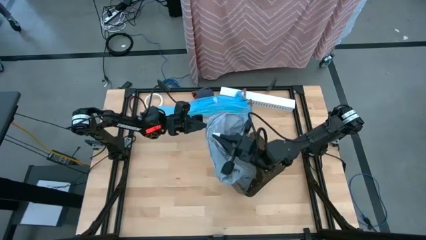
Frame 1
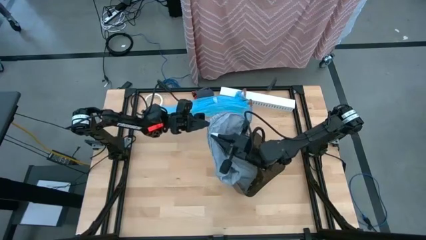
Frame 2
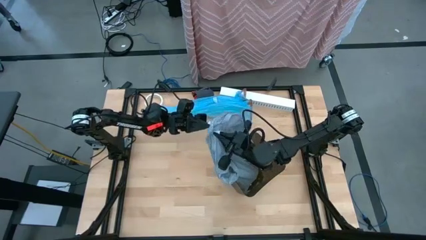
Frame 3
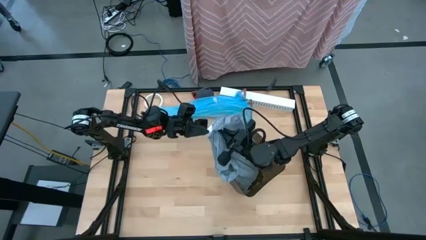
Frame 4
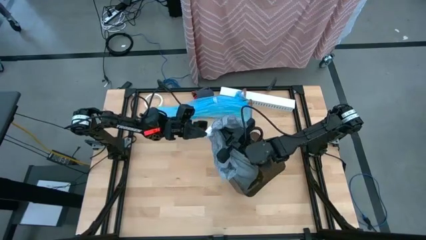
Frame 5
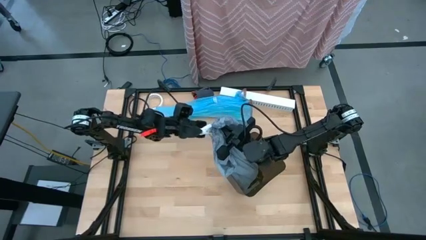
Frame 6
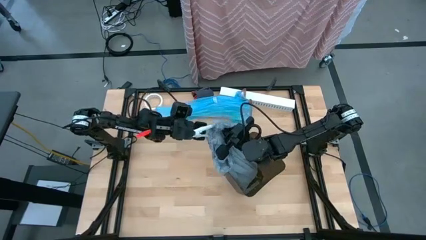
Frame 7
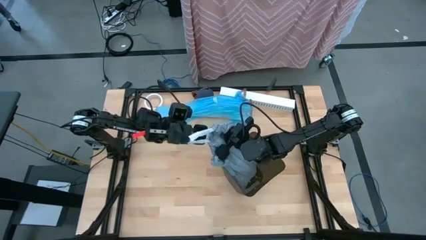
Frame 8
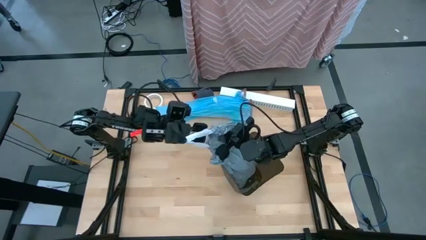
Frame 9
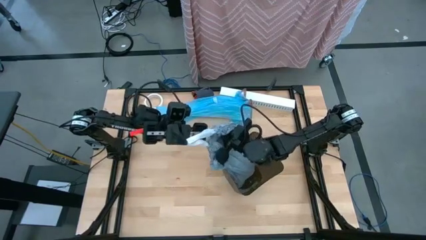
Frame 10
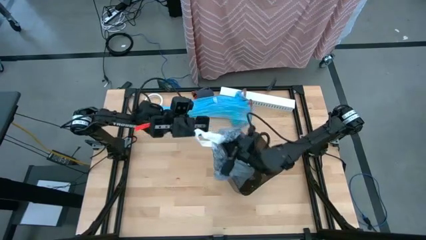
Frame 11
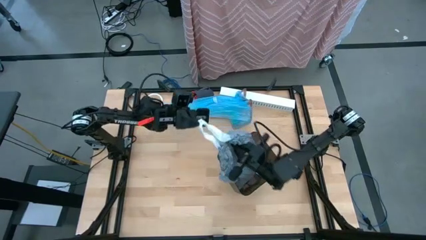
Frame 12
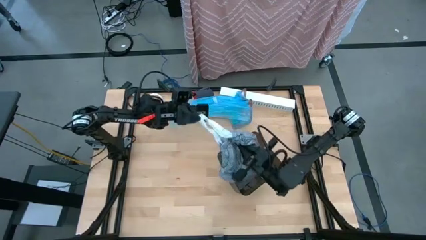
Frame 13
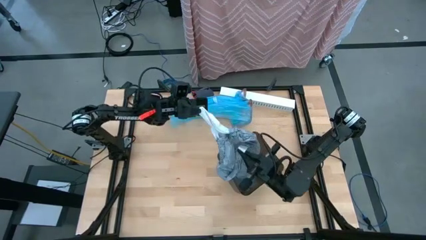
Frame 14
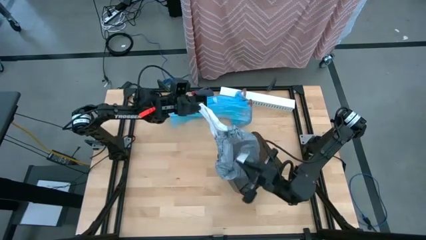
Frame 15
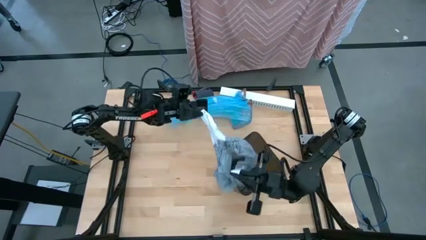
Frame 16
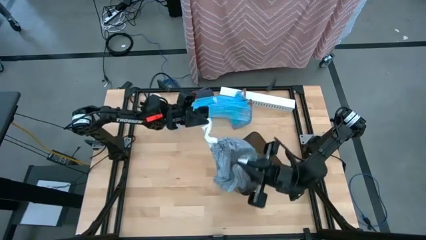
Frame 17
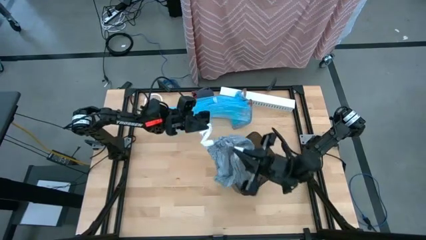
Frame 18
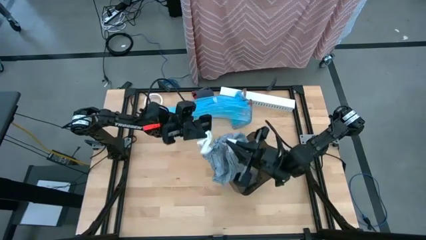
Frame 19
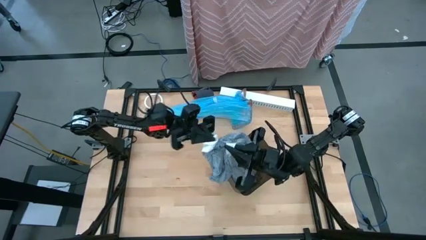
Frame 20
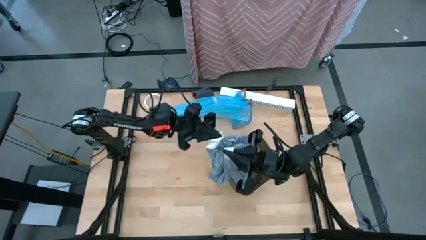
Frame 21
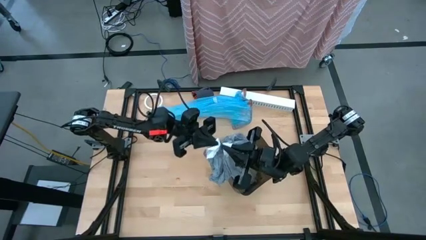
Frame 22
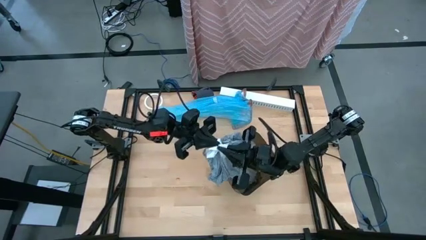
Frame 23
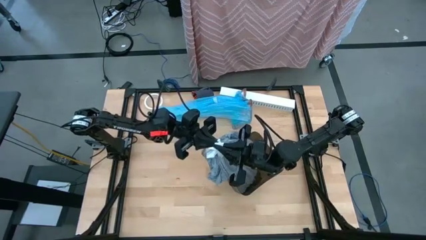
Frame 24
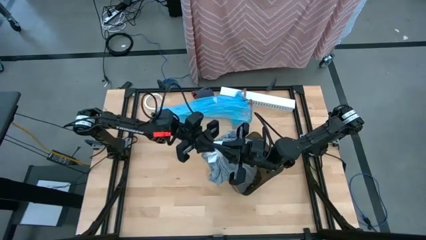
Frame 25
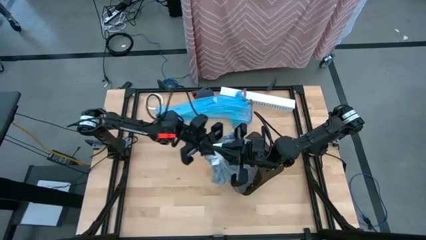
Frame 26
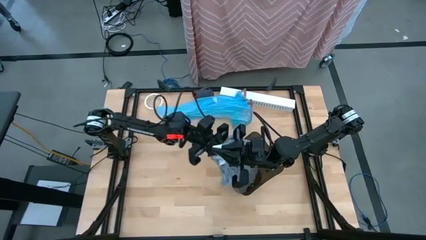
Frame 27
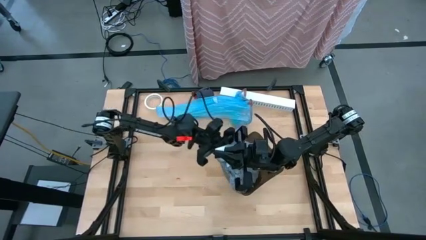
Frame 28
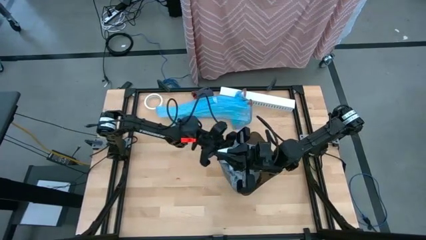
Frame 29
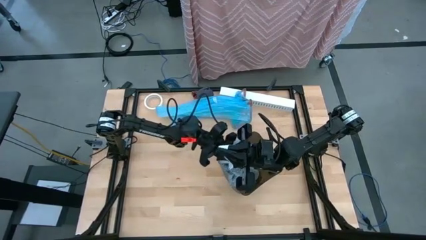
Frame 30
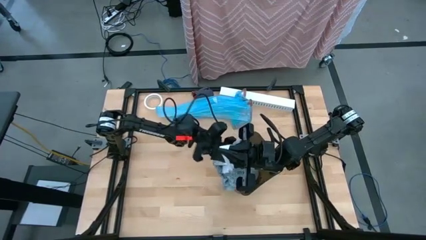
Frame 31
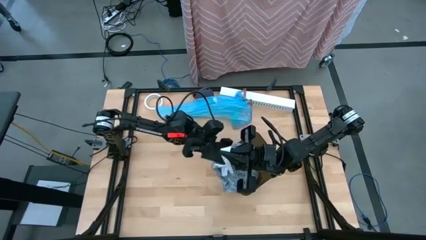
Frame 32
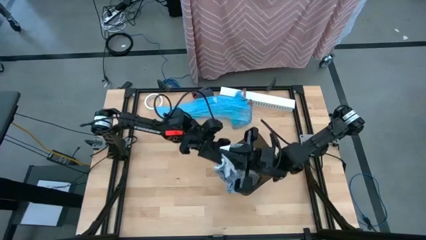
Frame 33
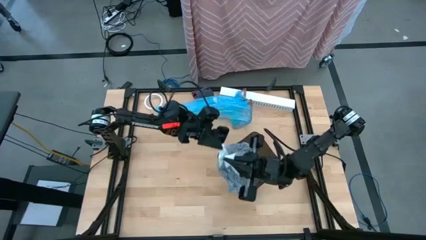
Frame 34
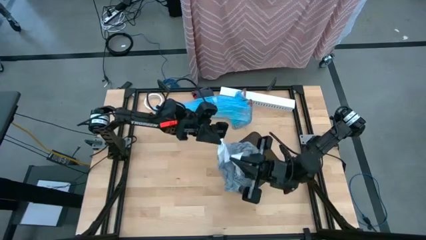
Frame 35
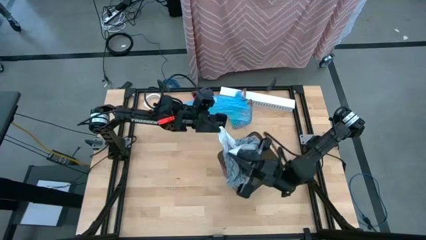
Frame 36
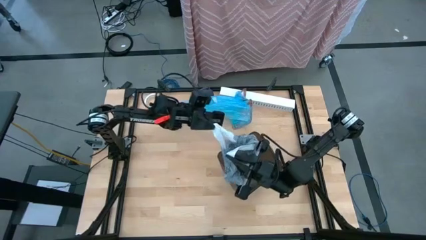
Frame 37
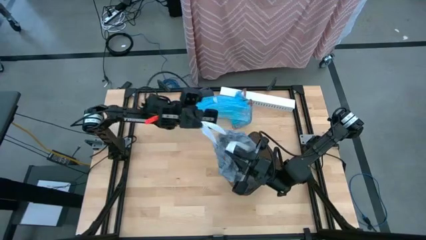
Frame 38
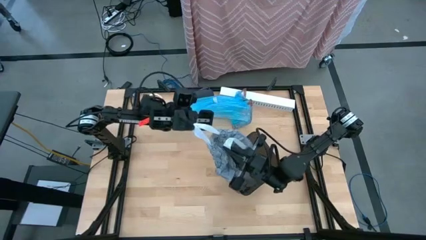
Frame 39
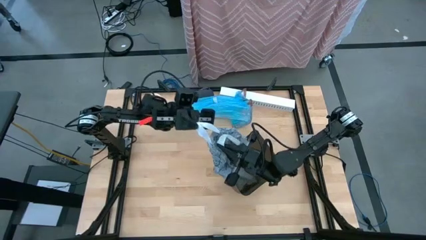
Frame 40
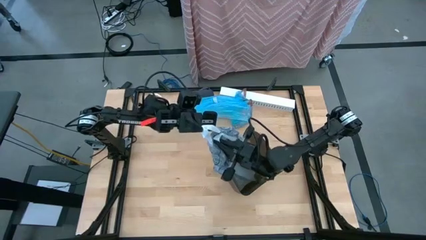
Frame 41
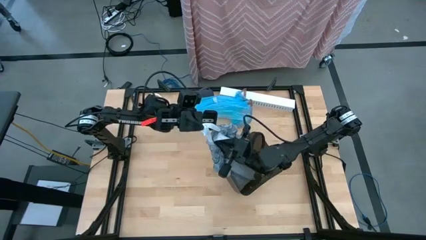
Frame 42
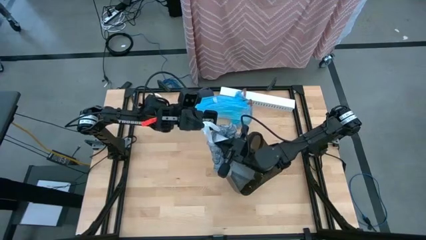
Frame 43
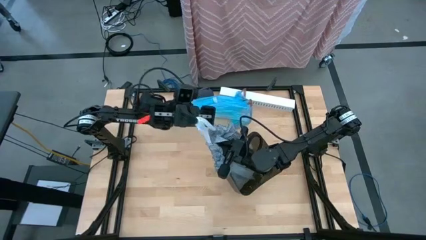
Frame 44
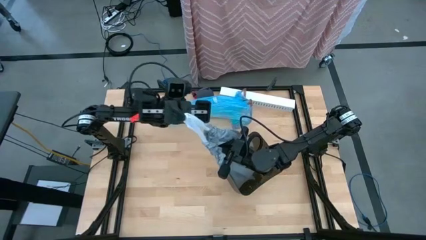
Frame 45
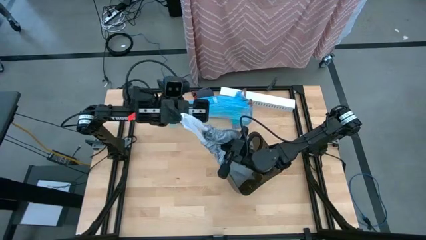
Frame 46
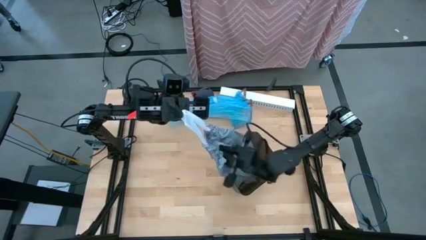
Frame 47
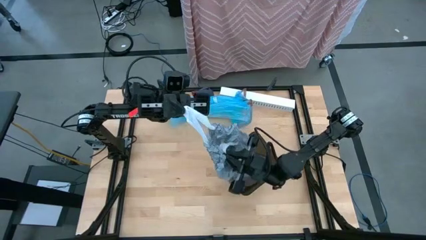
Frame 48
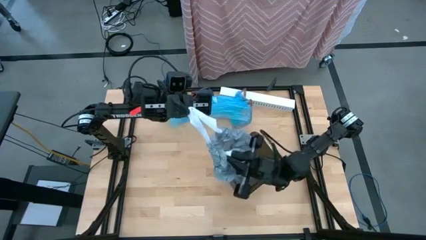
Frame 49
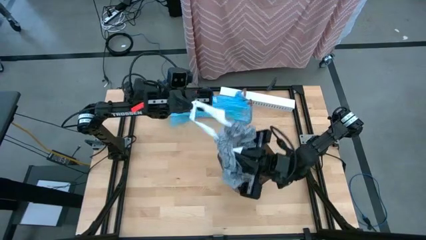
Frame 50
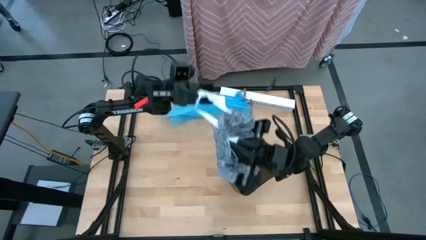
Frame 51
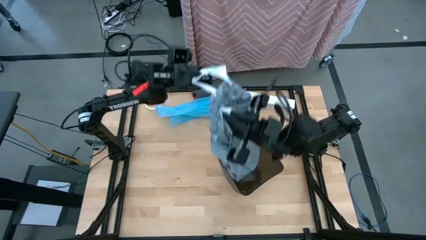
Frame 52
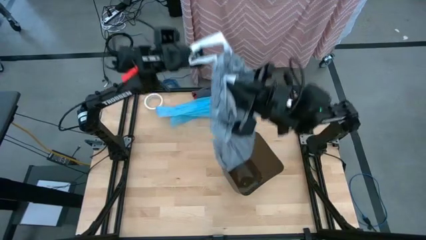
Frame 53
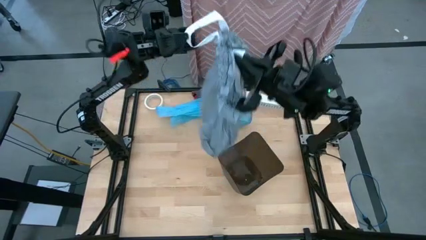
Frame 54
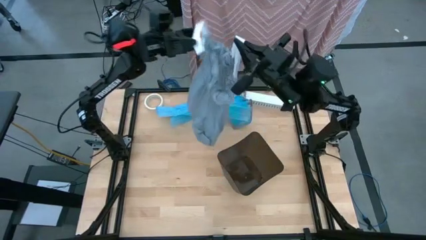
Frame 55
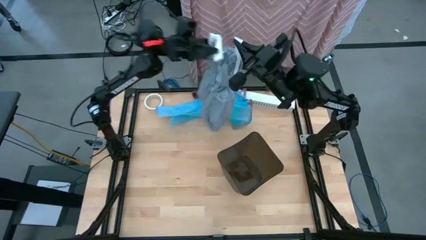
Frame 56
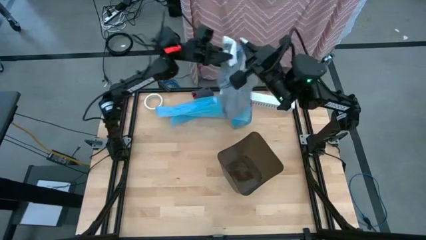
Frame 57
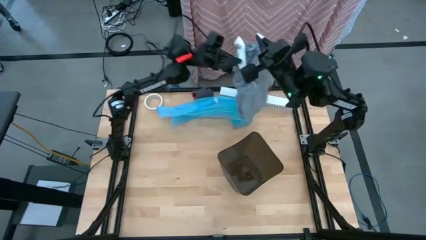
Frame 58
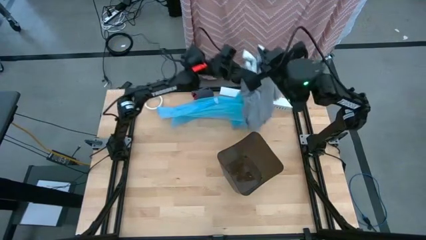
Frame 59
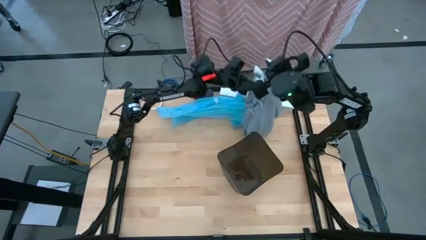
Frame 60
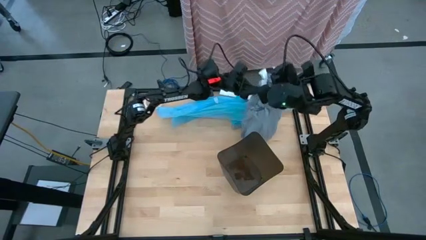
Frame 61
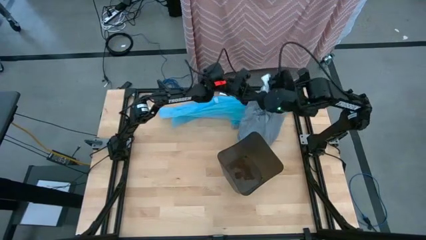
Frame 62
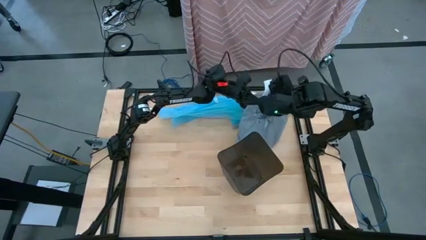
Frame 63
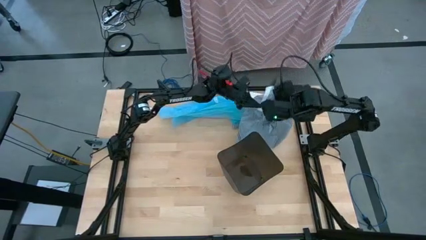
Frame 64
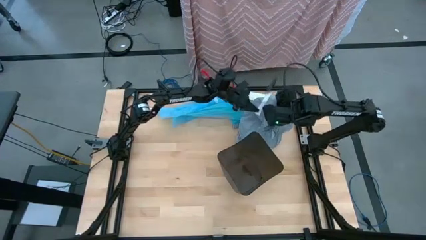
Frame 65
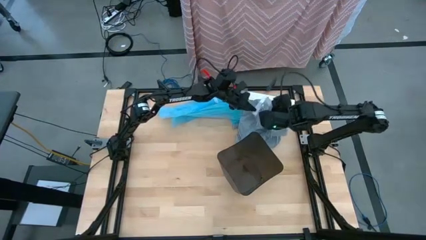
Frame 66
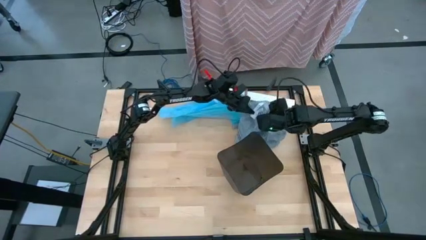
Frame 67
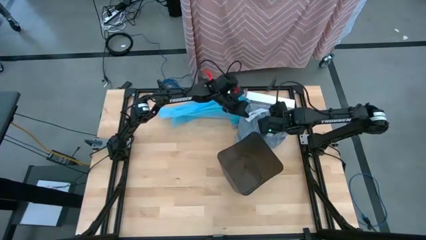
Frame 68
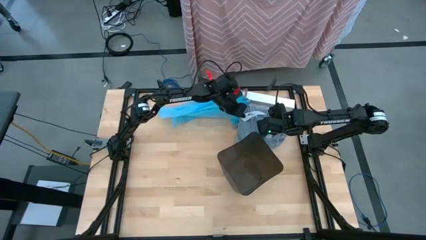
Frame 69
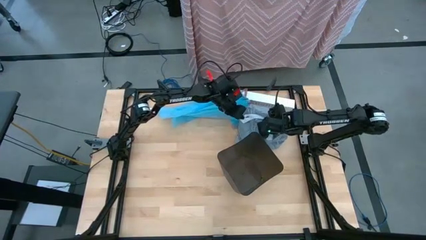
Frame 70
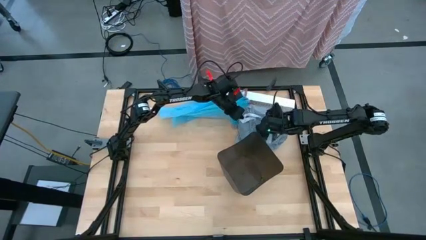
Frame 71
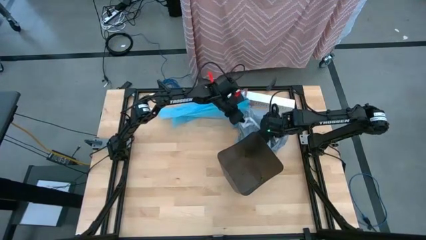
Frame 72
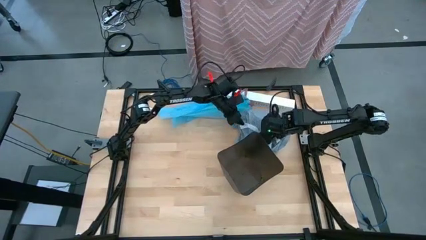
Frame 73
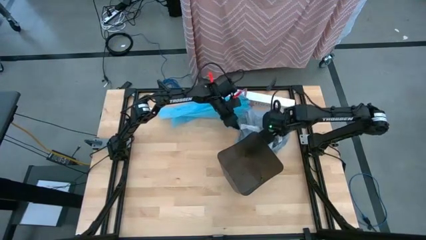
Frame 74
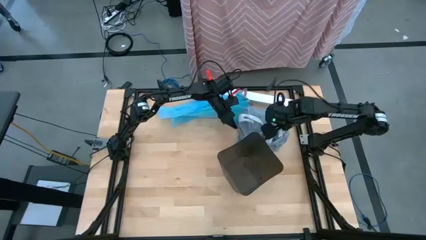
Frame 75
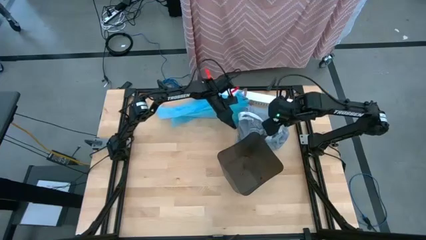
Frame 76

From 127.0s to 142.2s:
Task: place trash/remove bag and relplace
Remove the blue trash bag from the black trash bin using the drawstring
